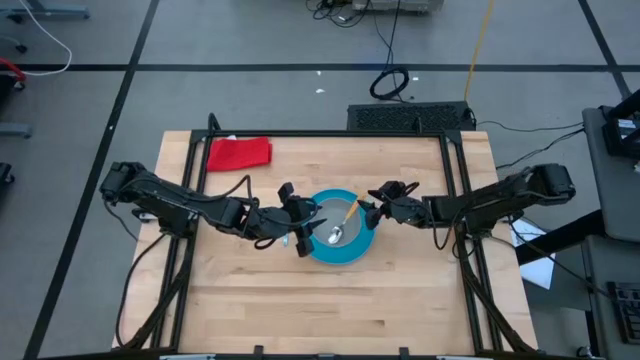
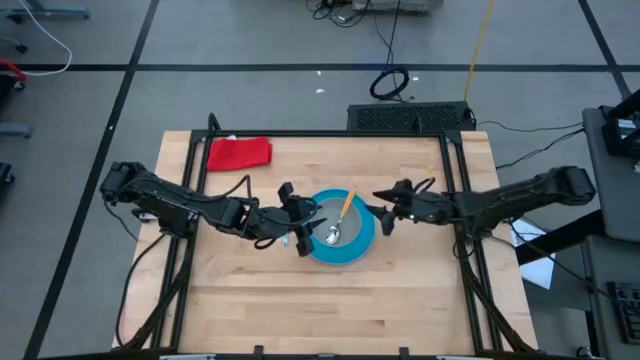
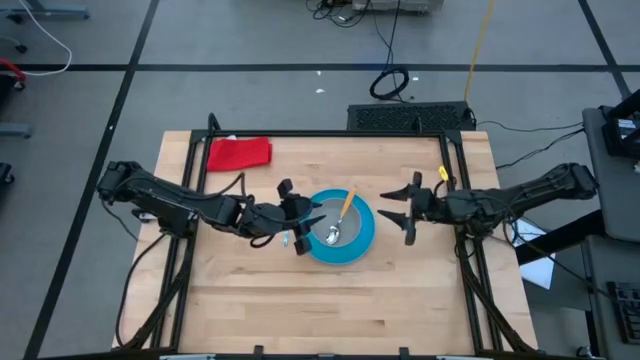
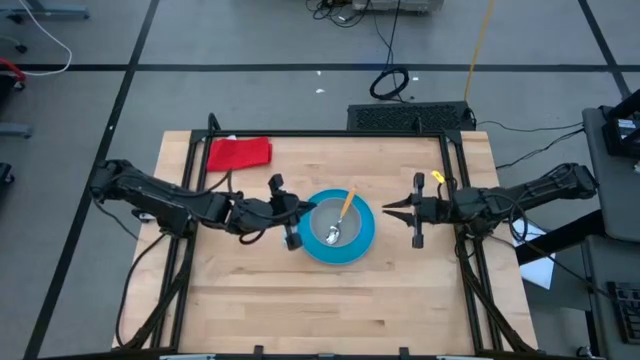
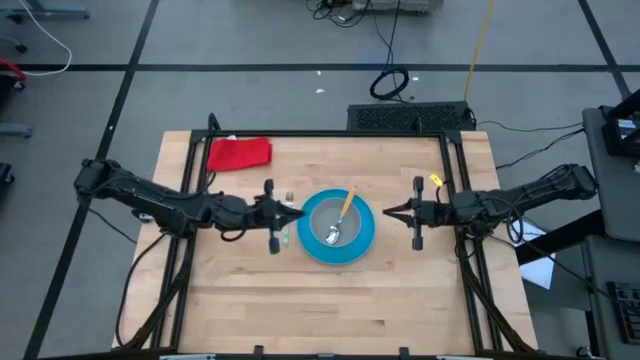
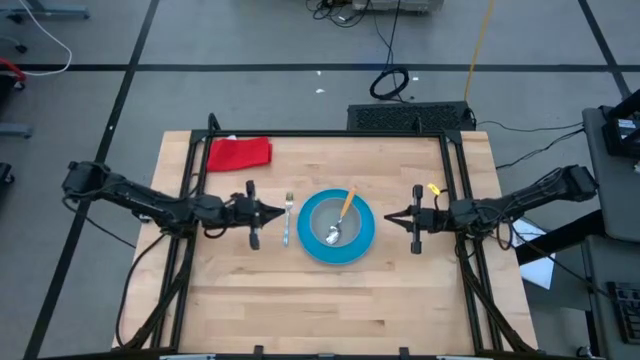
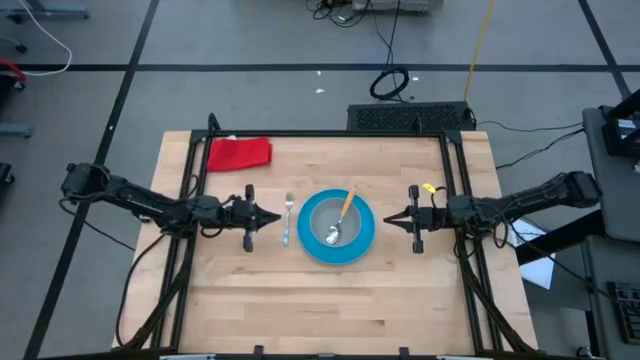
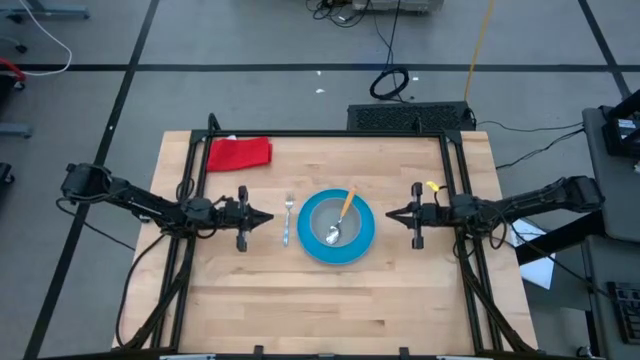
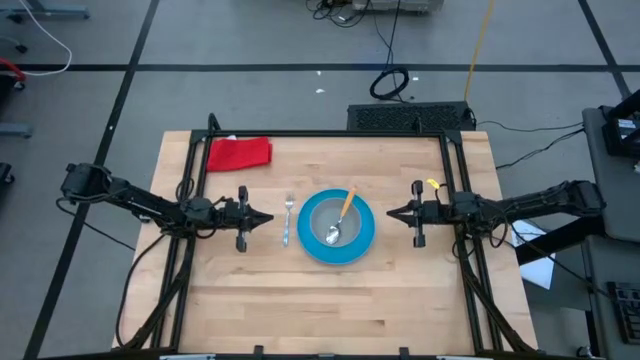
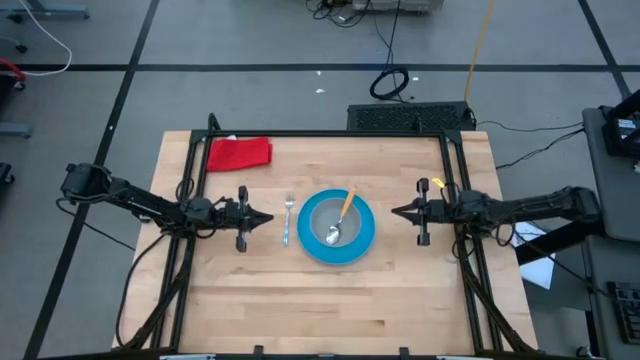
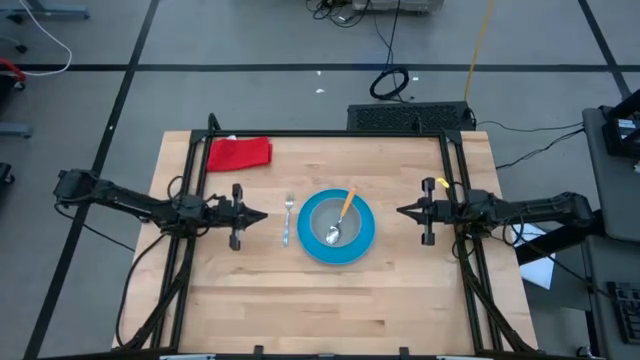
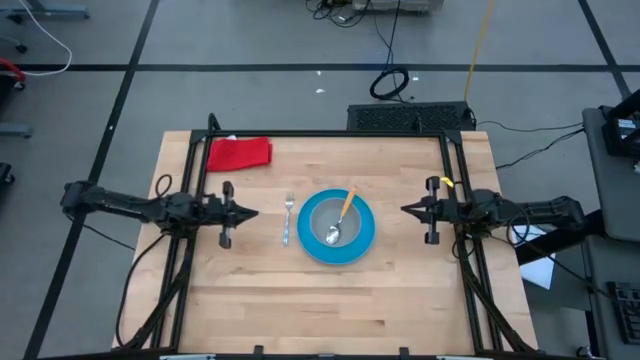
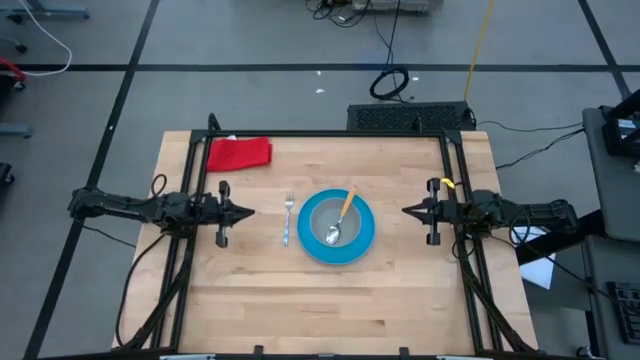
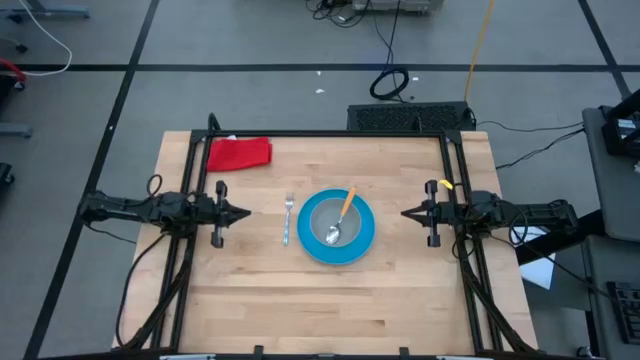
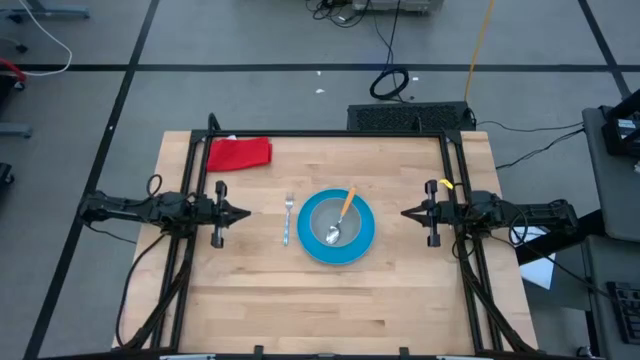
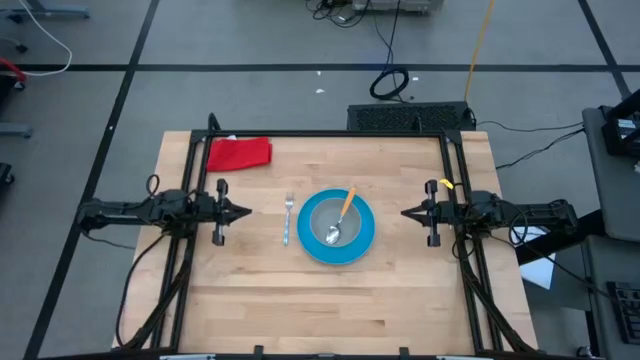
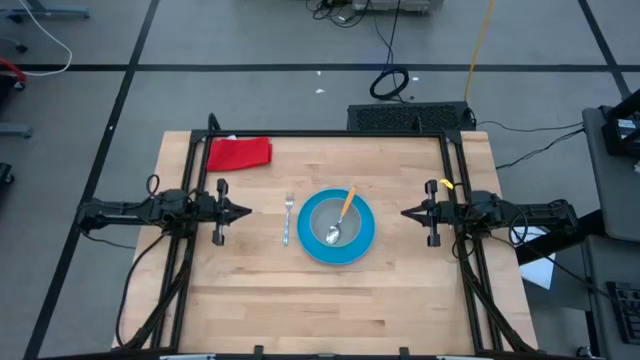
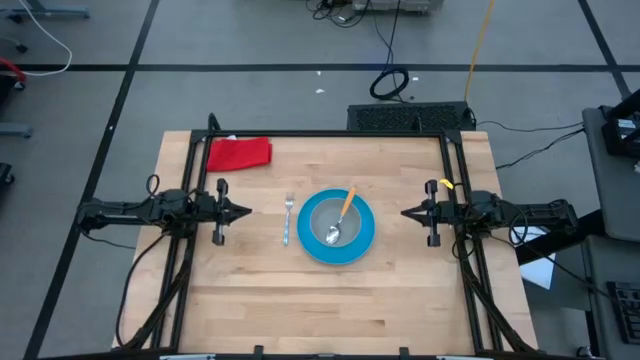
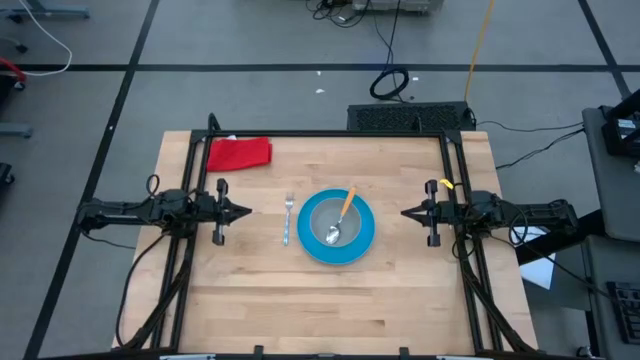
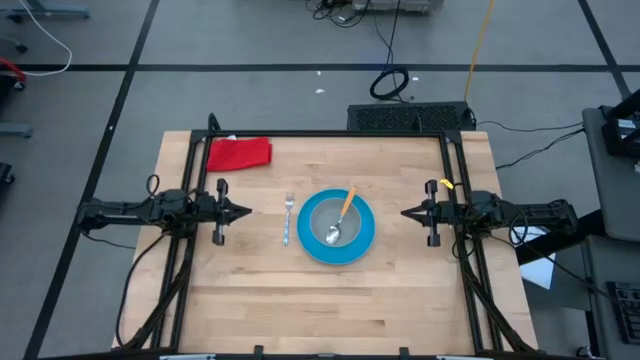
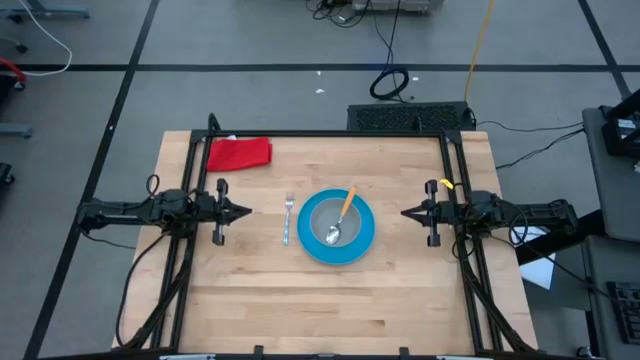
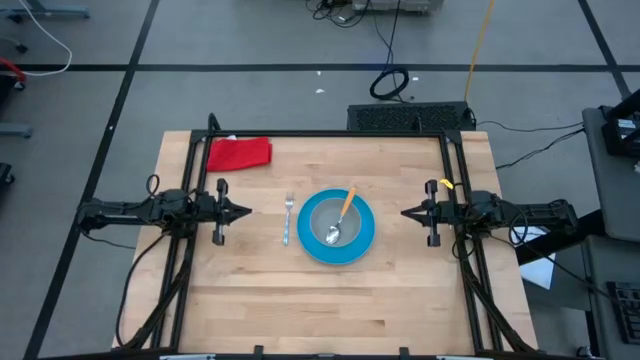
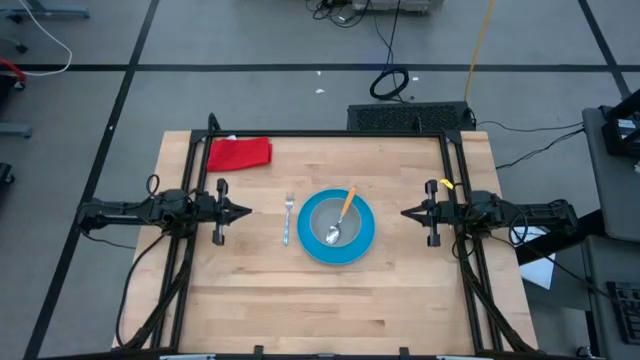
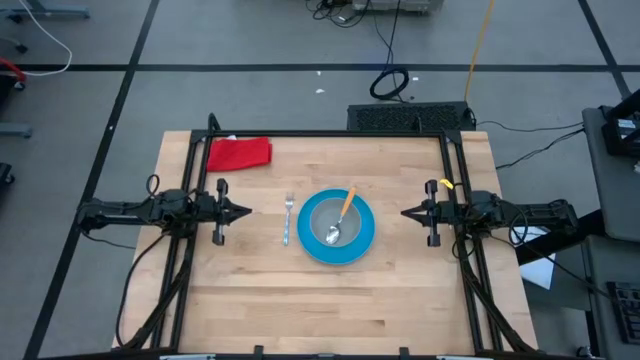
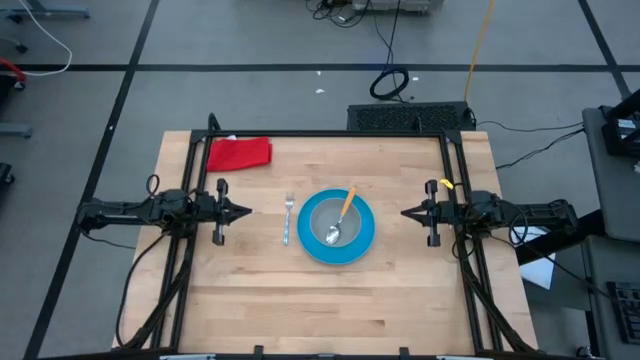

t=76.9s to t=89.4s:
Task: Set table place
Return to Home Position

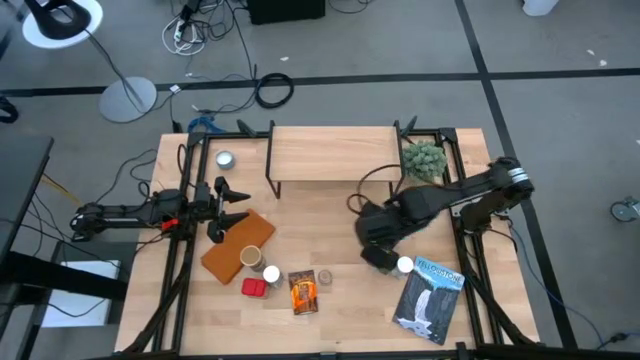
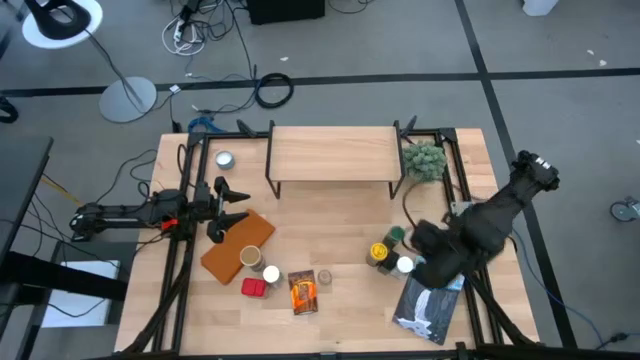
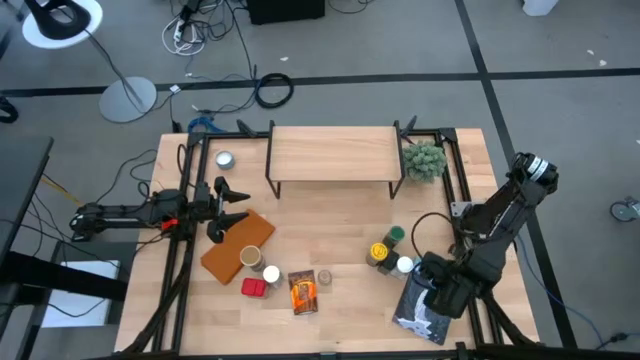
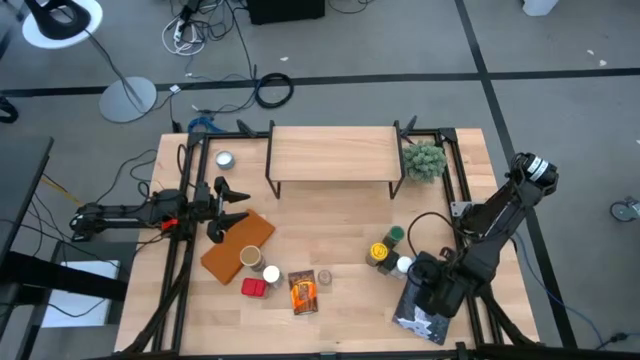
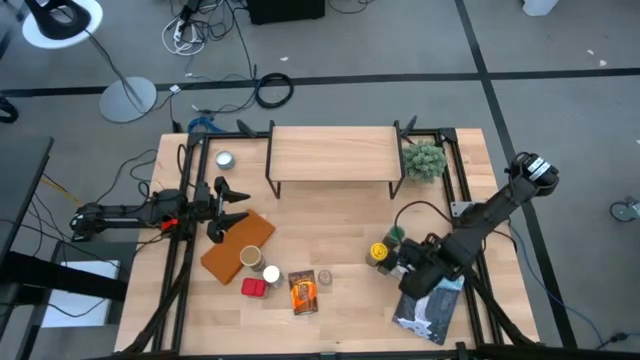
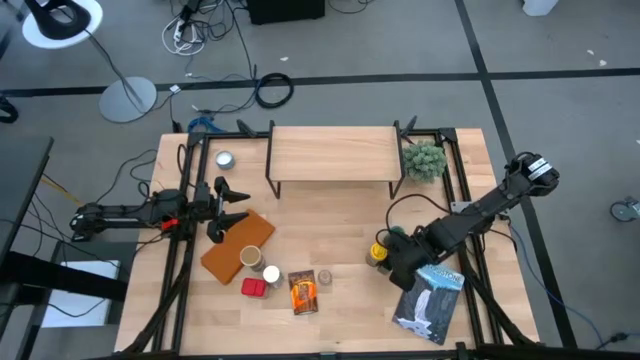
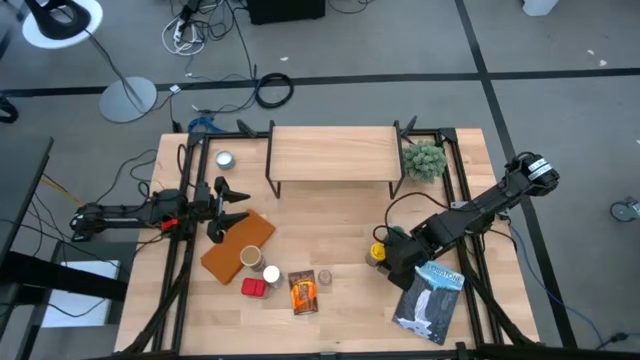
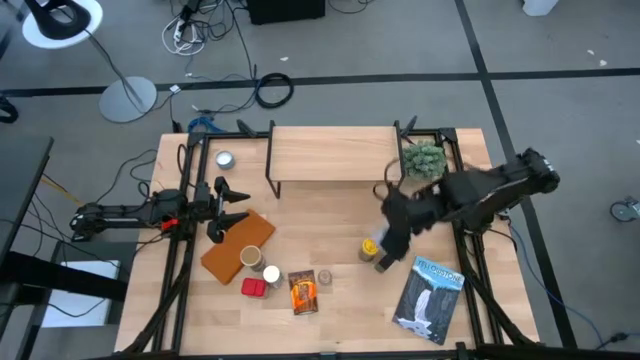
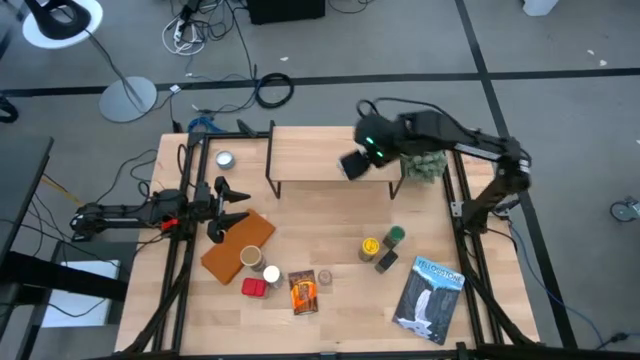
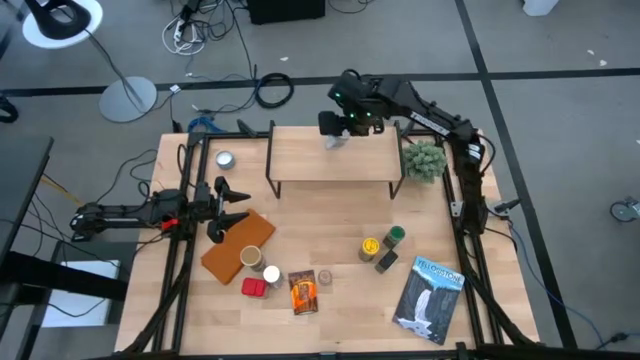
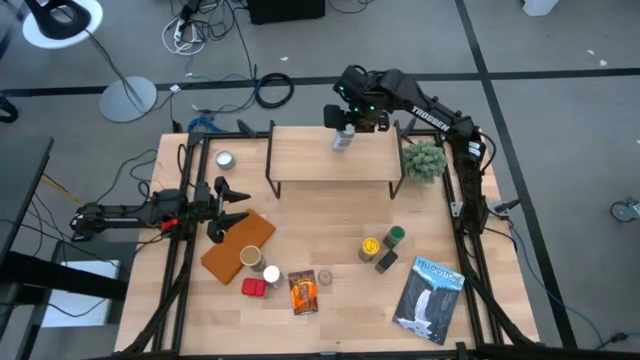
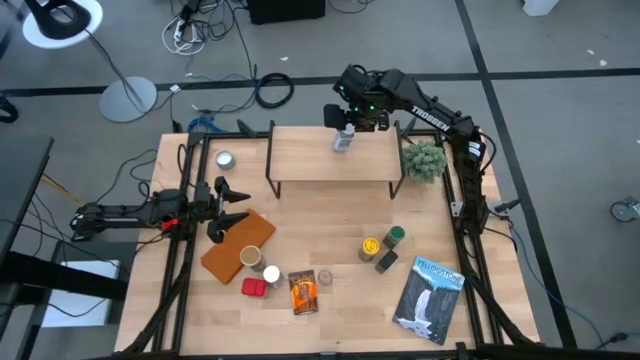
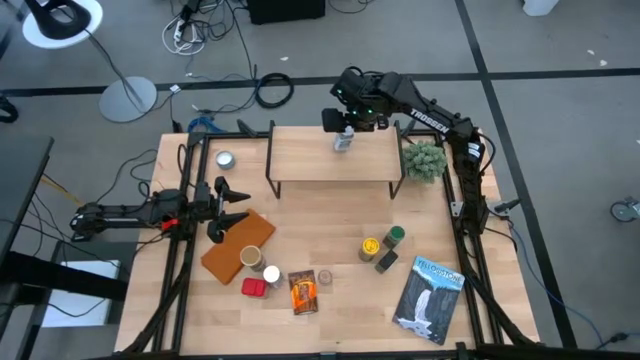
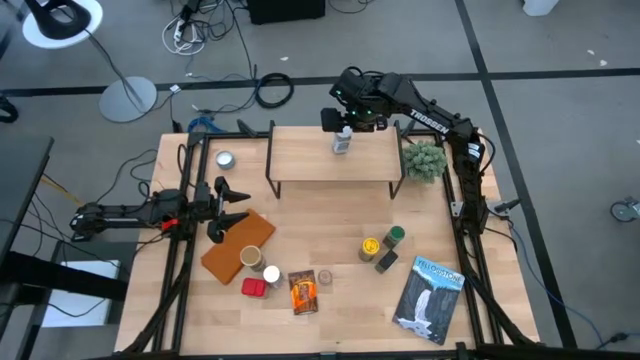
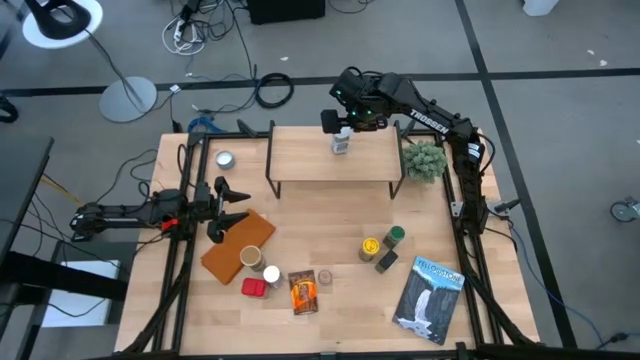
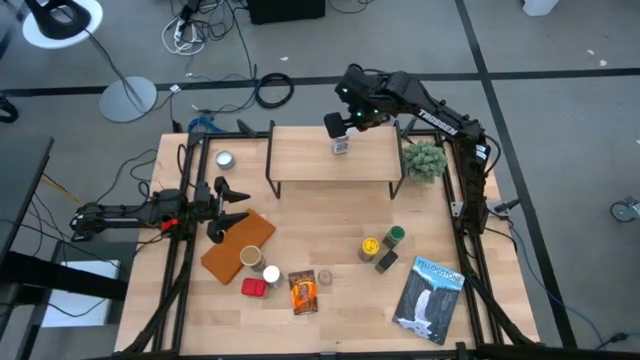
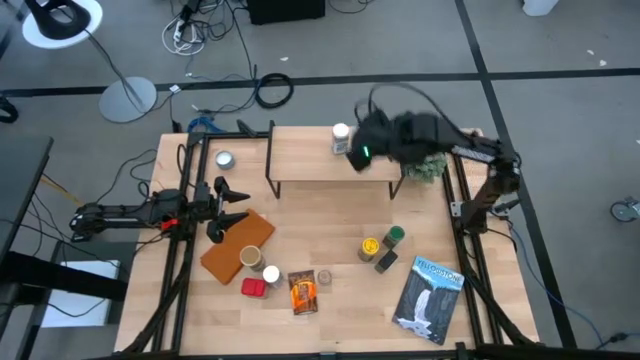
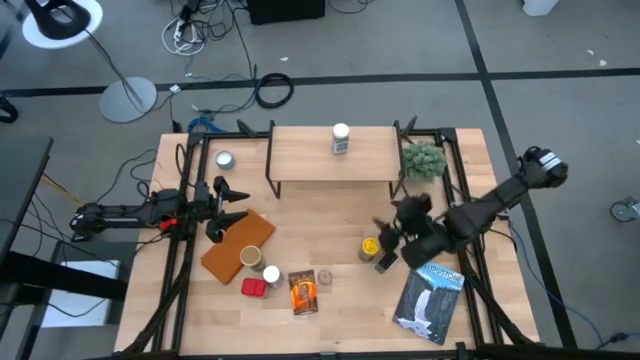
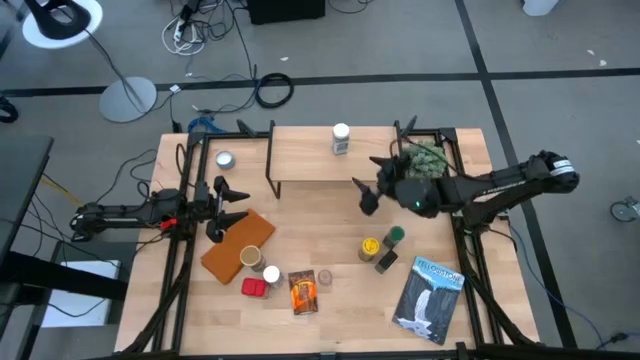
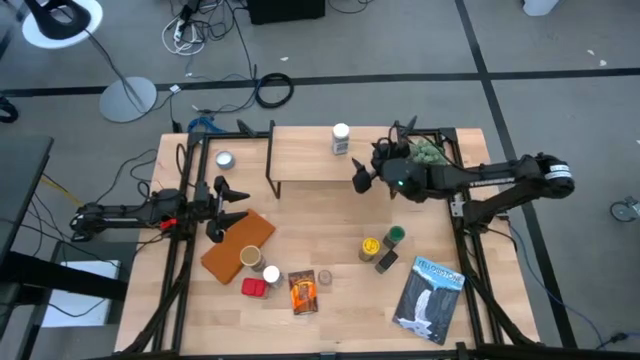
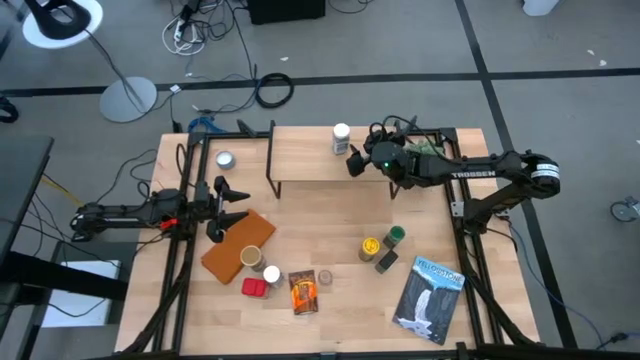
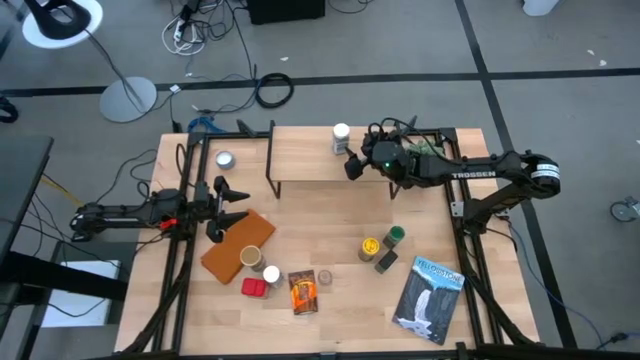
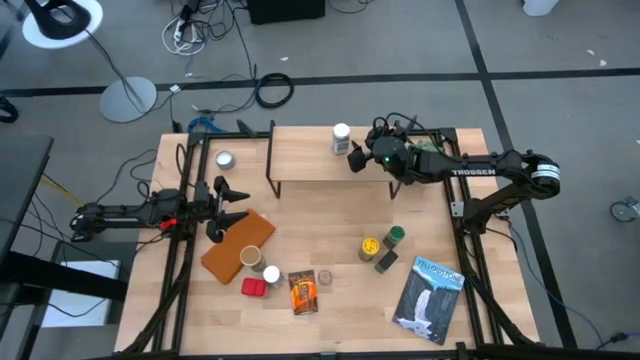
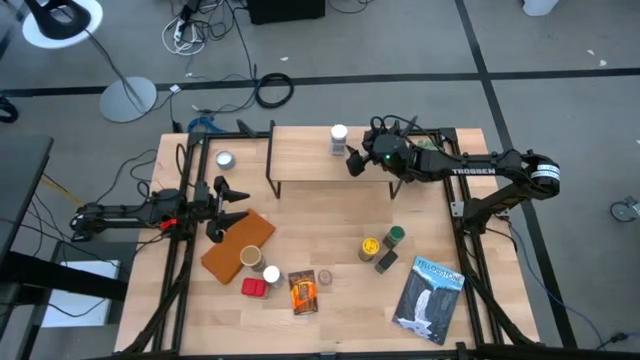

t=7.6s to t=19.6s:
Task: Shelf spices
Put the right white seasoning bottle on the shelf
